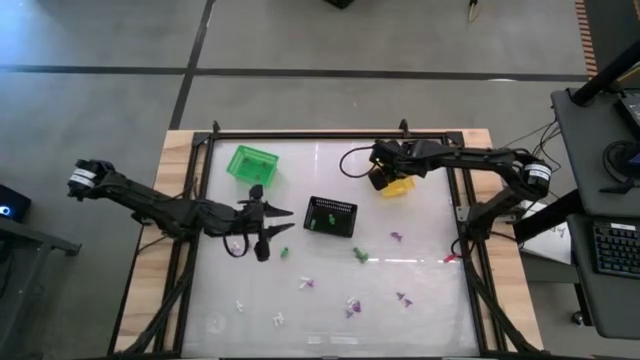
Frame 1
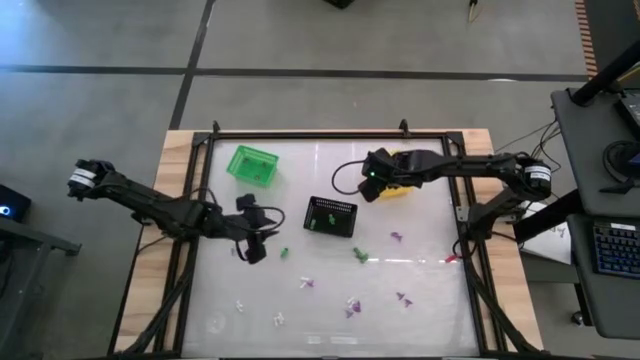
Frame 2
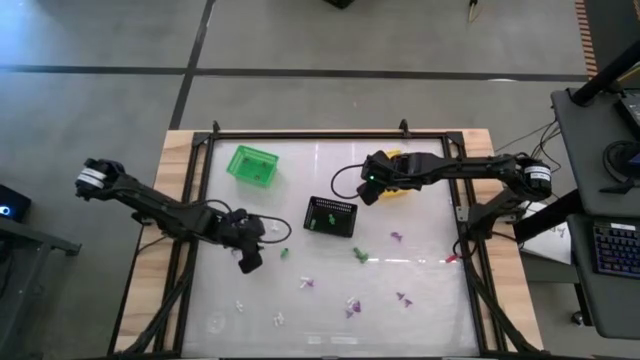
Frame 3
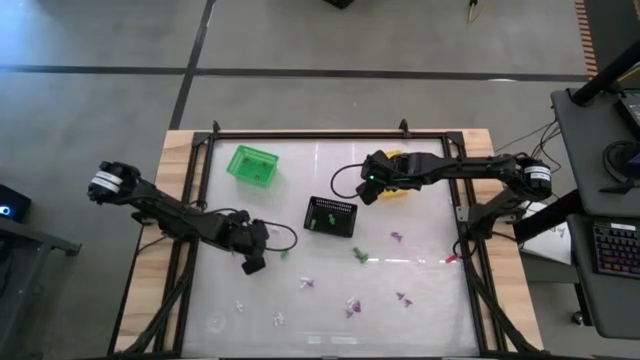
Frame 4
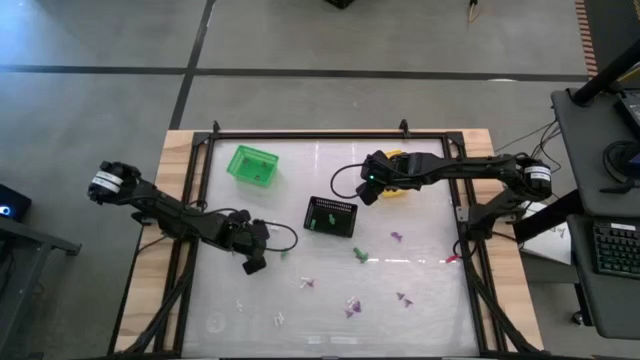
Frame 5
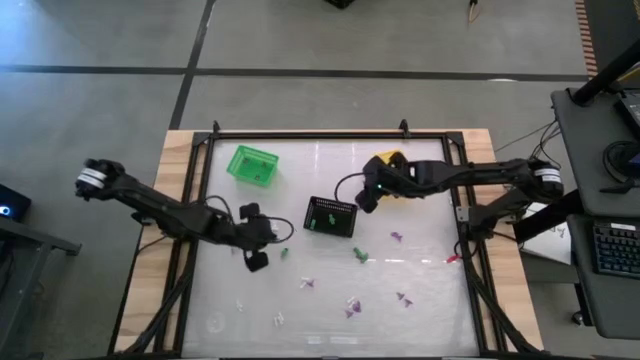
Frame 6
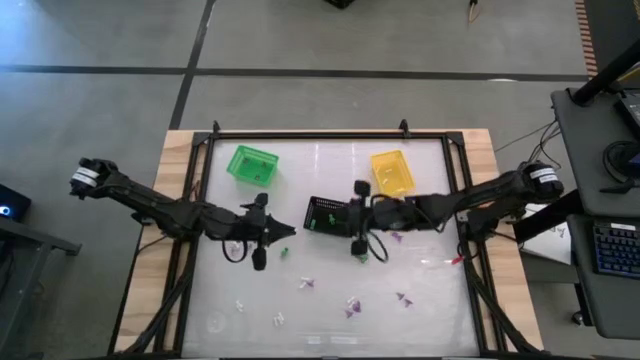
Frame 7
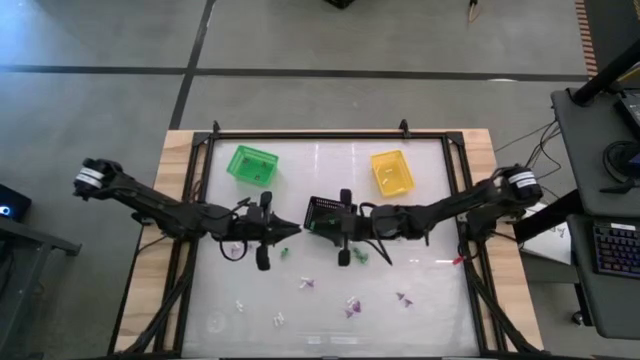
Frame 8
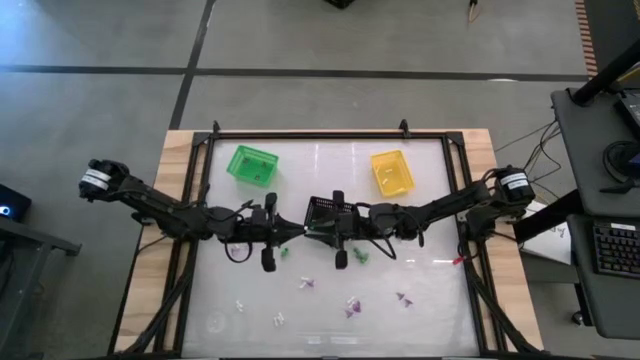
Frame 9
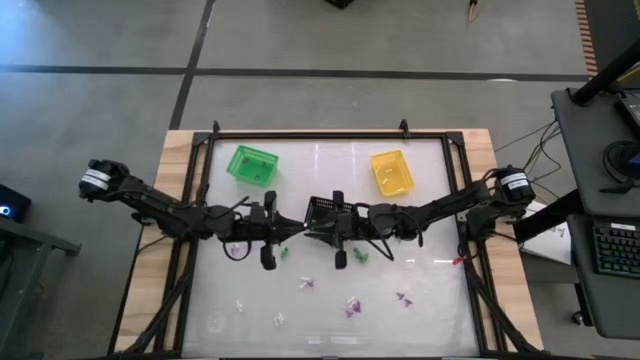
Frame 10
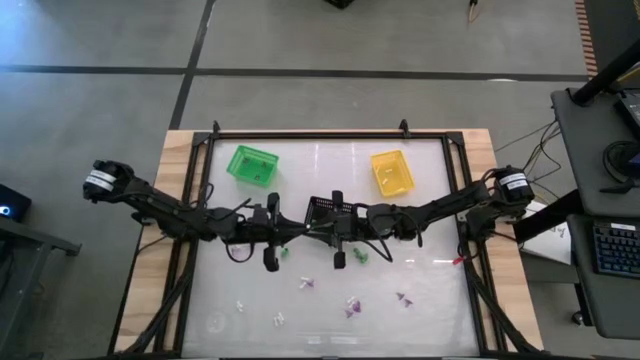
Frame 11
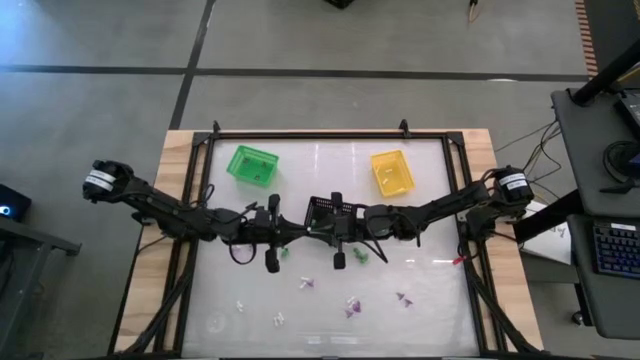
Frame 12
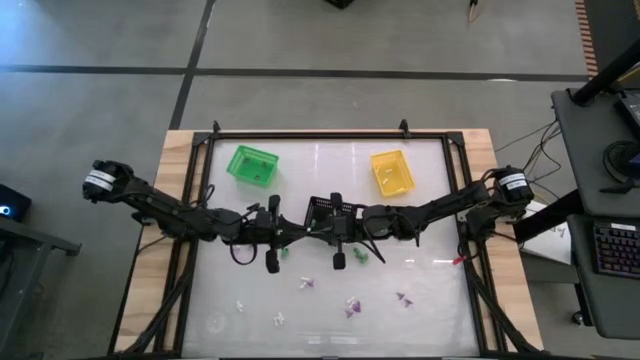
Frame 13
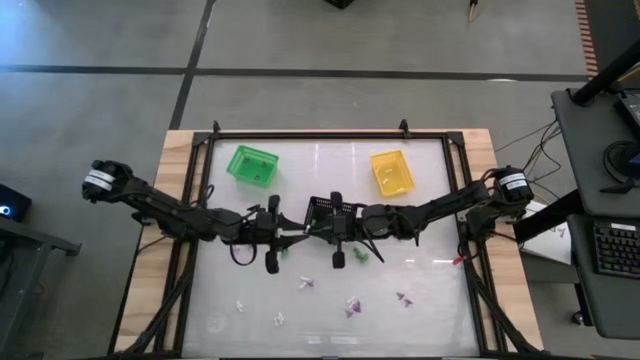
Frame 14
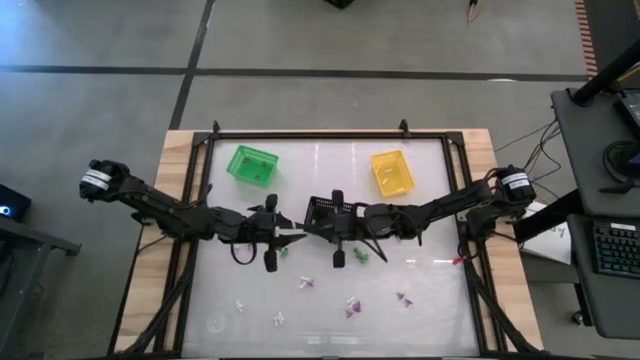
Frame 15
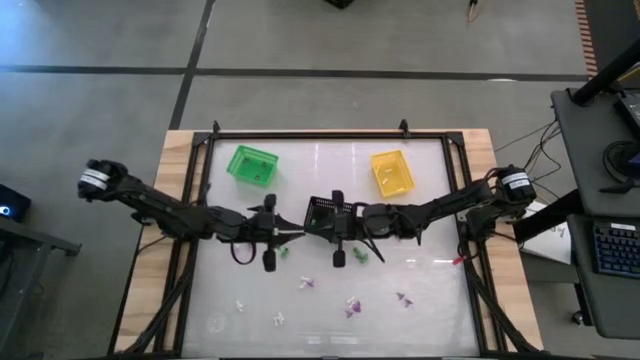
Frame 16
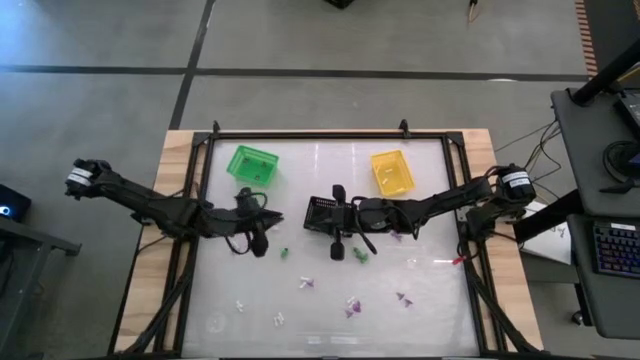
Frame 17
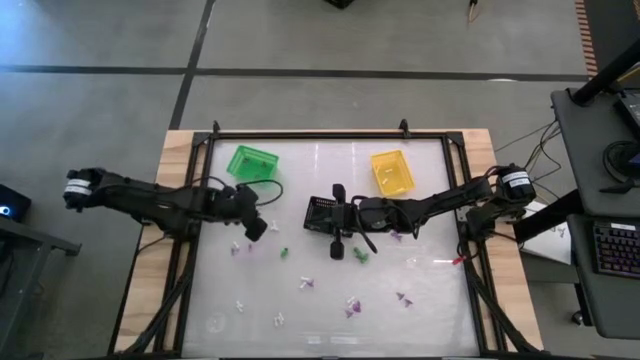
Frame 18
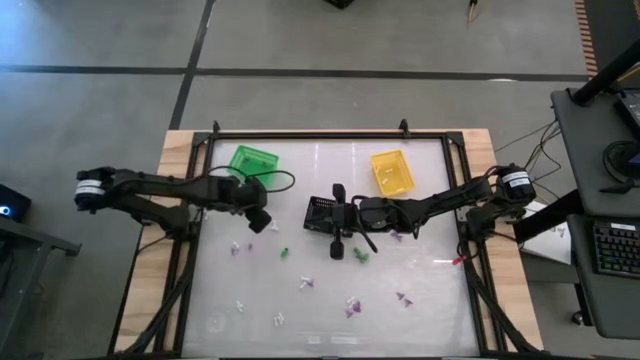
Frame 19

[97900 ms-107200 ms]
Task: Sort Halloween decoration
Put the white bone toy into the yellow bin

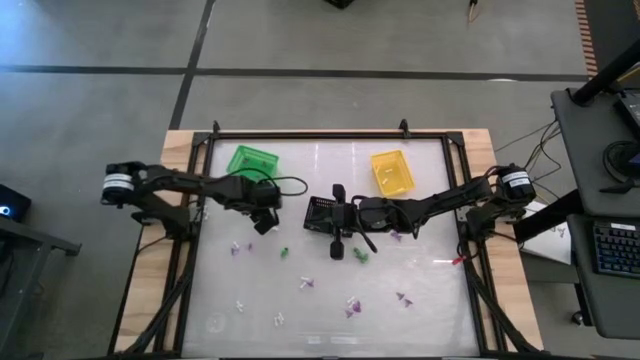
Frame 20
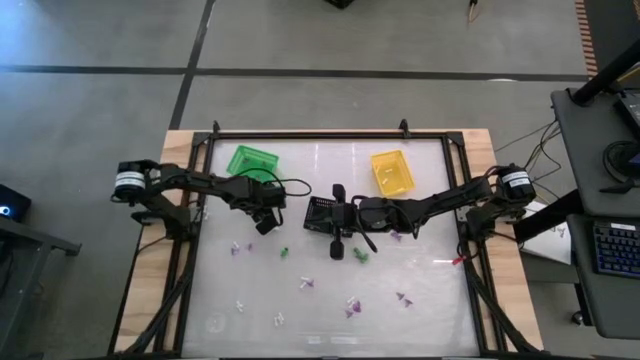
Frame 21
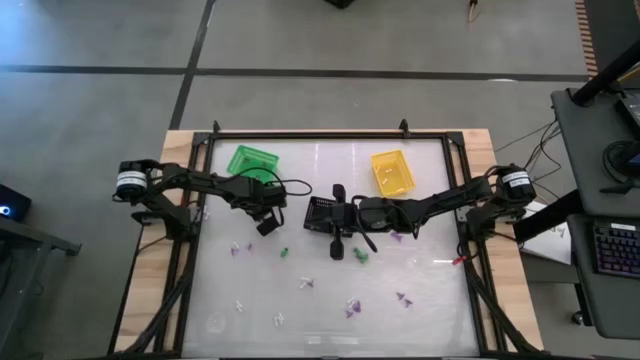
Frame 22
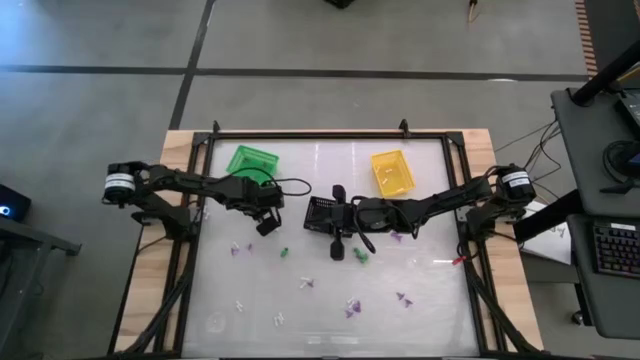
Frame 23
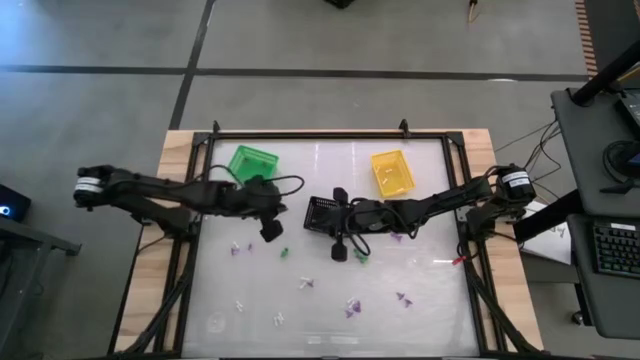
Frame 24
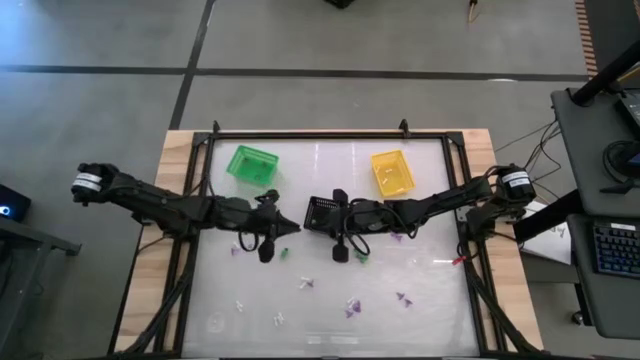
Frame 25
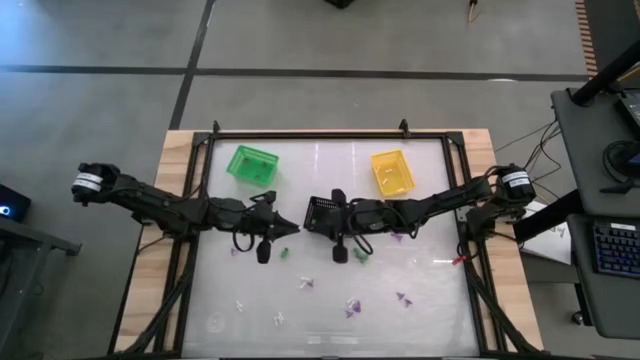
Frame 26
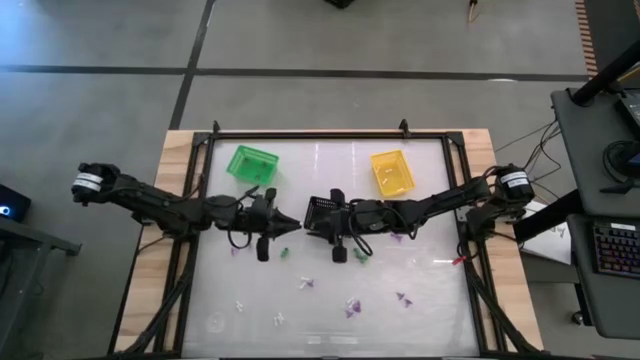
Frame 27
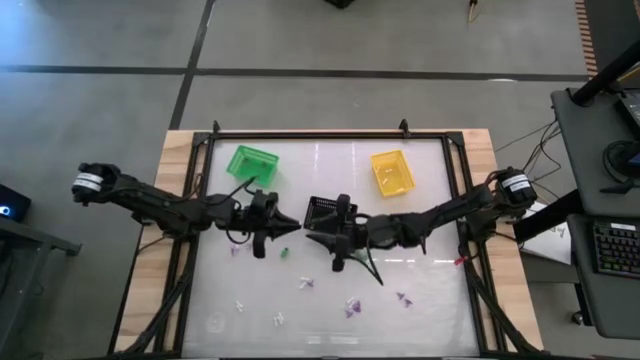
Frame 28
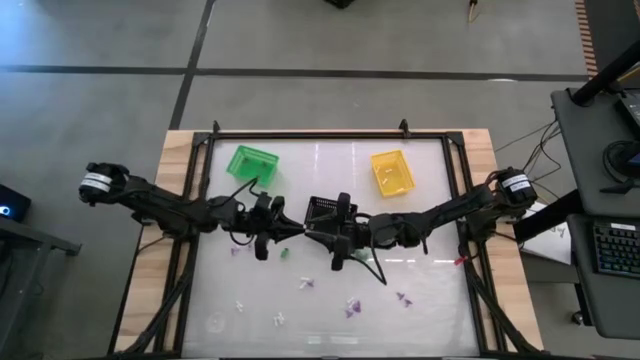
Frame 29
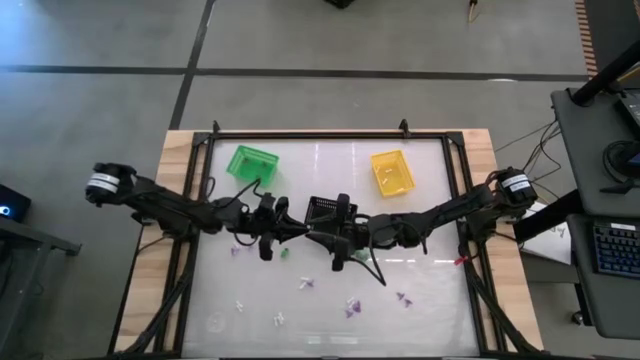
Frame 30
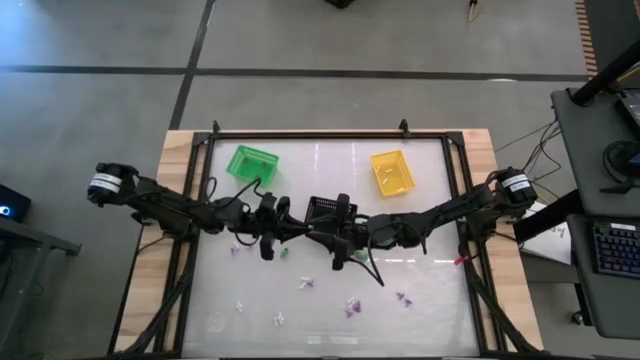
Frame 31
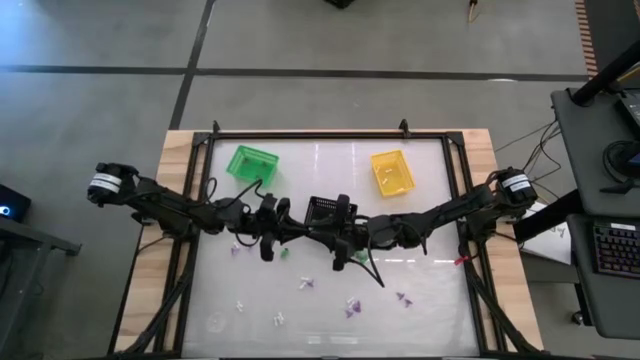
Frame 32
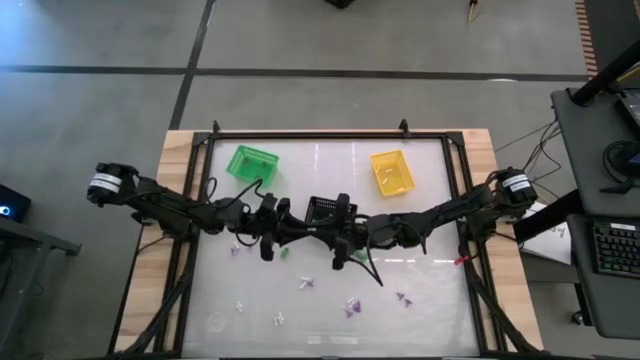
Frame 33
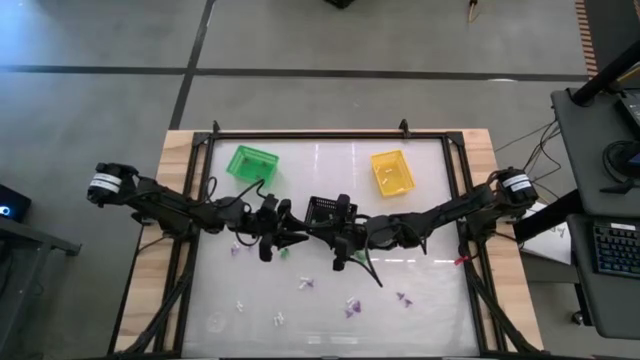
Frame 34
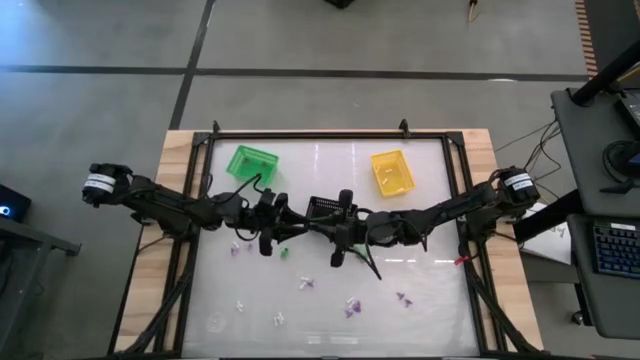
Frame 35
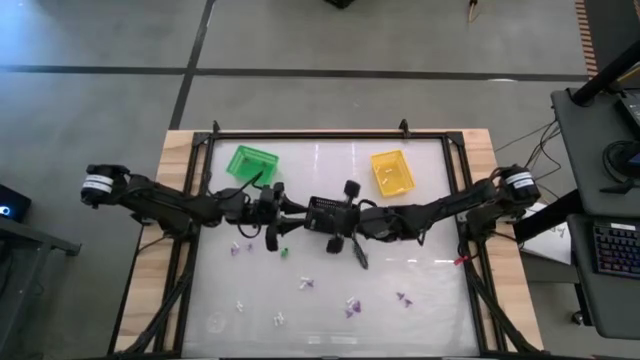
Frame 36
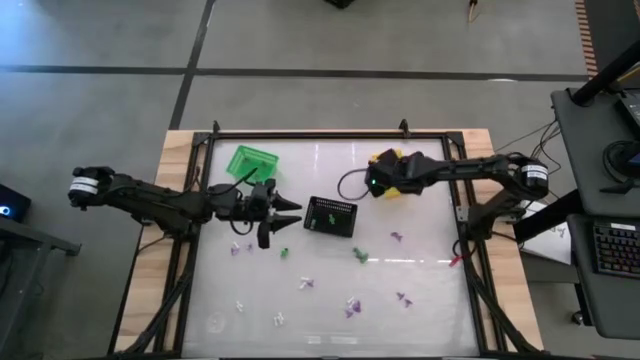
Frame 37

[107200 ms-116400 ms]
Put the white bone toy into the yellow bin

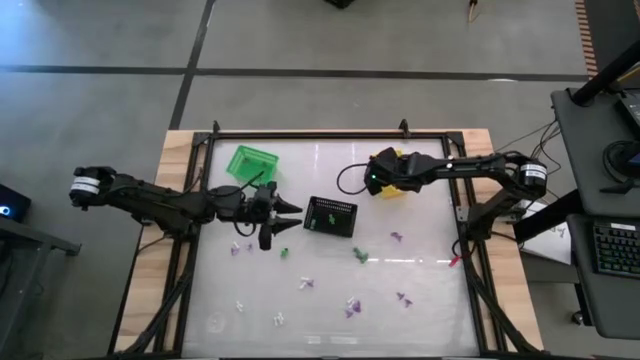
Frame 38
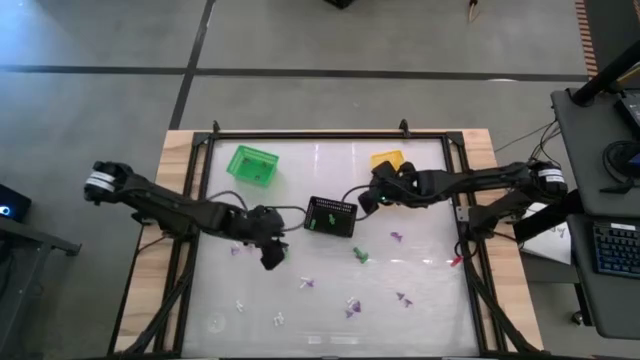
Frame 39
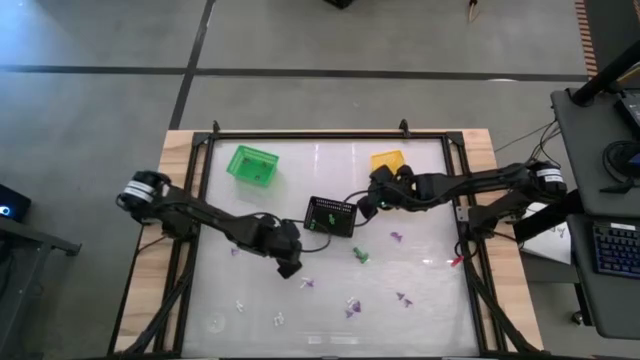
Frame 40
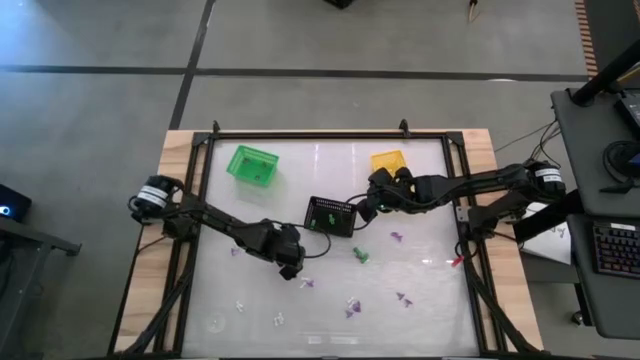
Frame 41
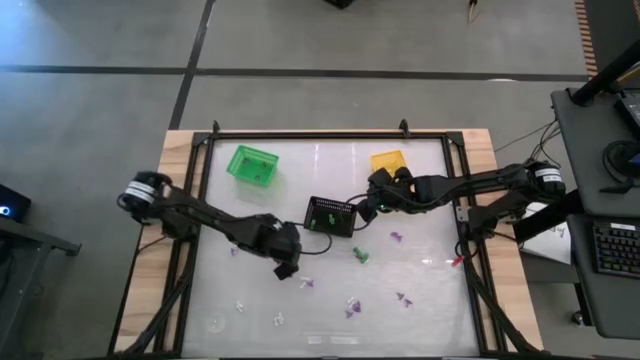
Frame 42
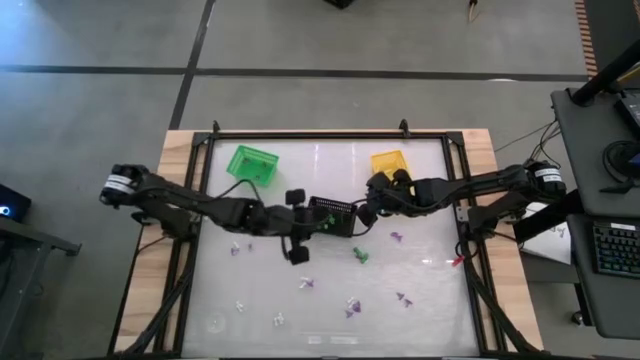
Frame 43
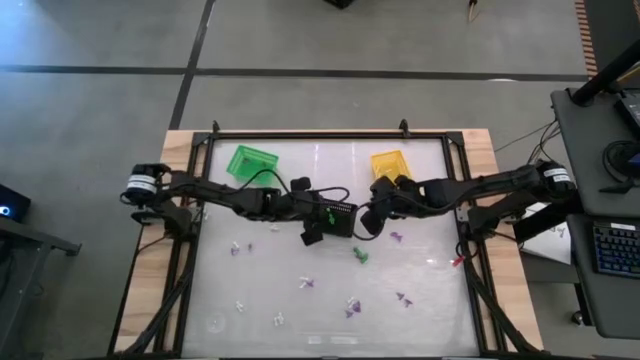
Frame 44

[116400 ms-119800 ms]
Put the green skeleton toy into the black bin
